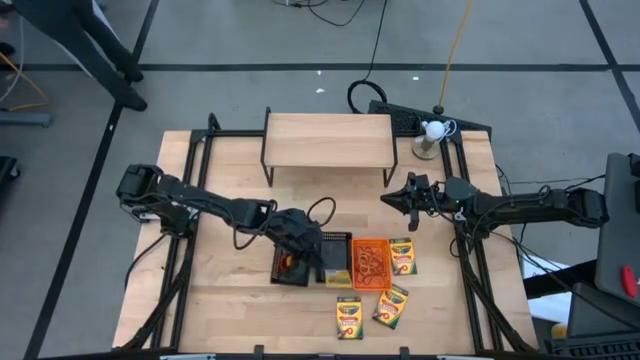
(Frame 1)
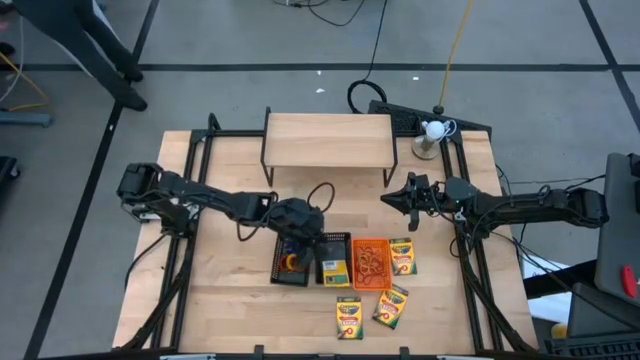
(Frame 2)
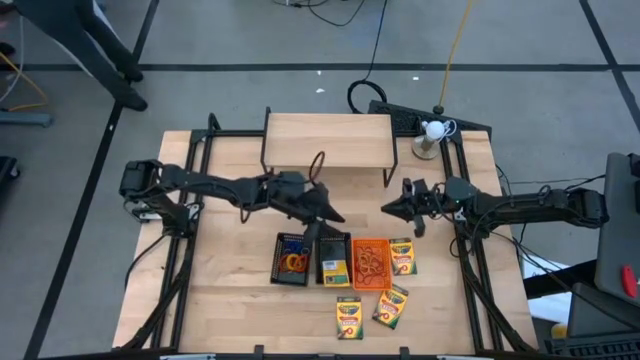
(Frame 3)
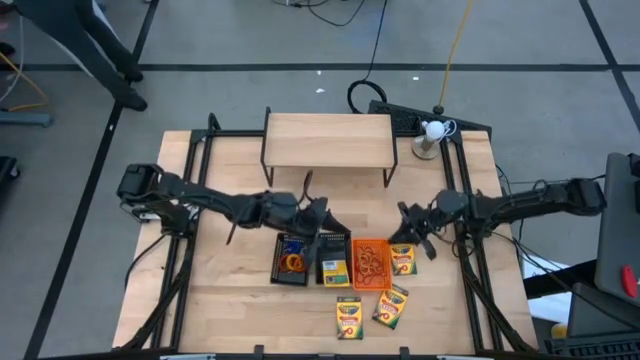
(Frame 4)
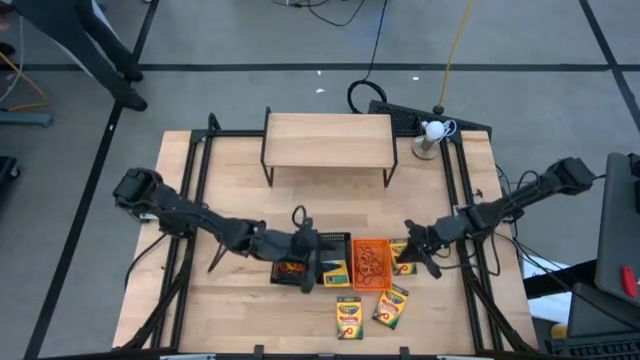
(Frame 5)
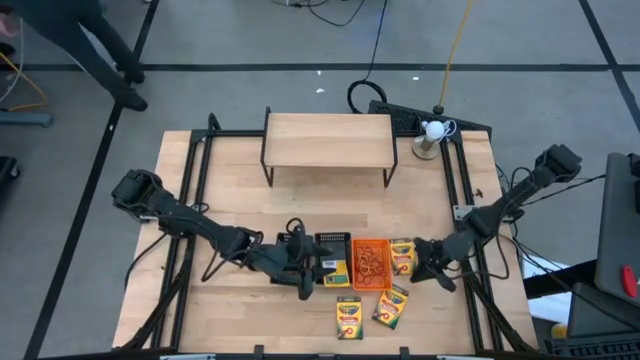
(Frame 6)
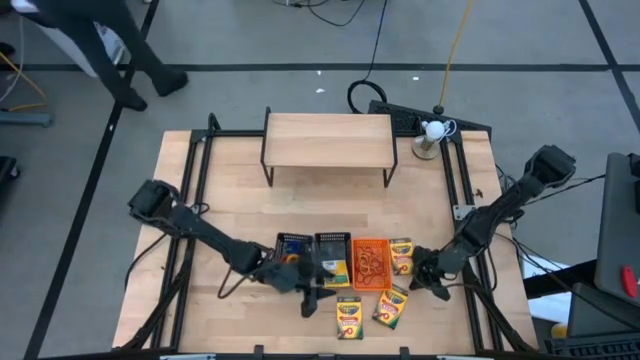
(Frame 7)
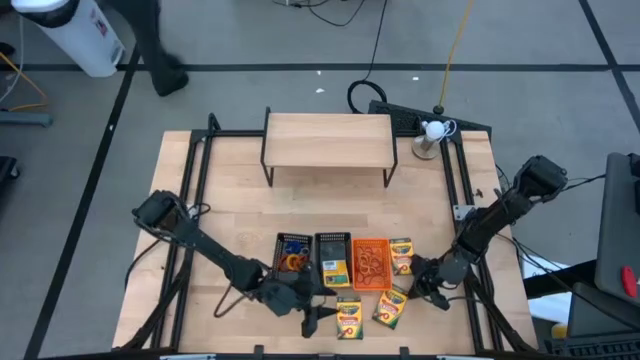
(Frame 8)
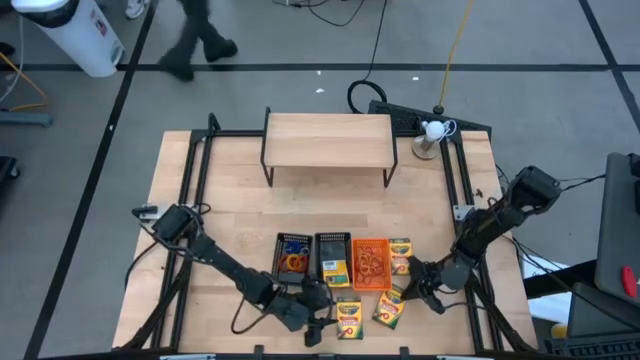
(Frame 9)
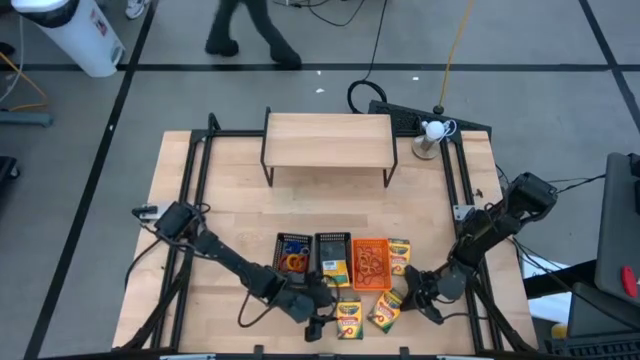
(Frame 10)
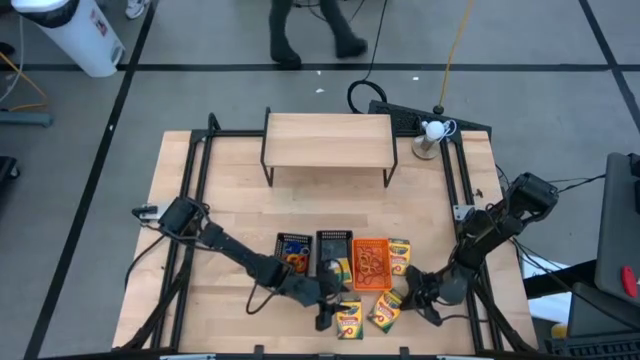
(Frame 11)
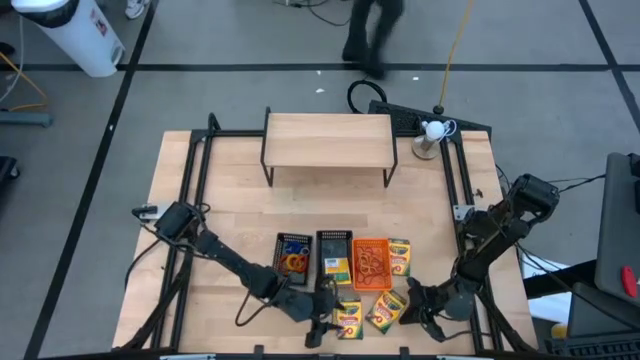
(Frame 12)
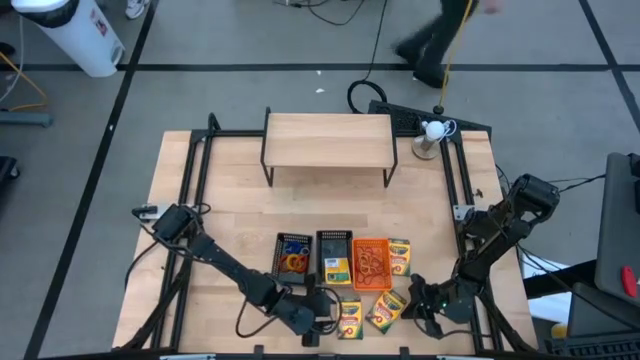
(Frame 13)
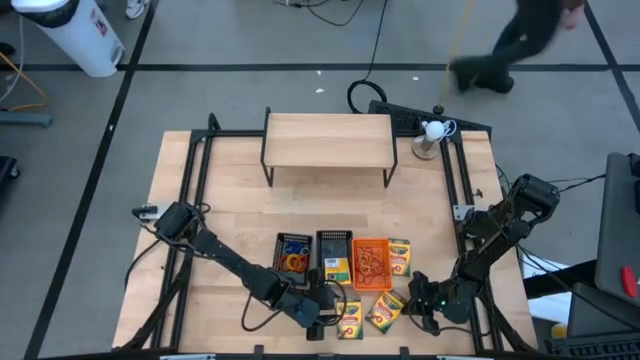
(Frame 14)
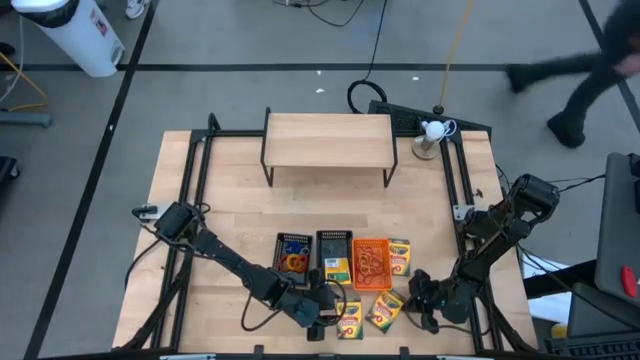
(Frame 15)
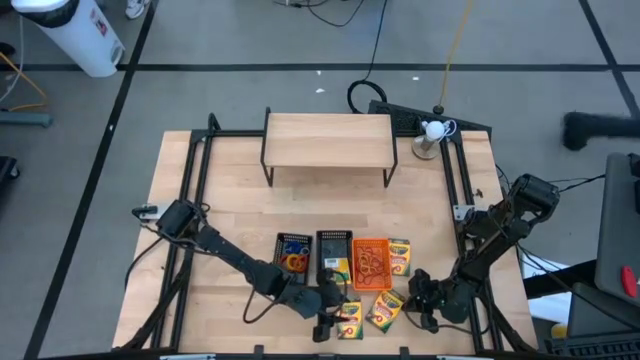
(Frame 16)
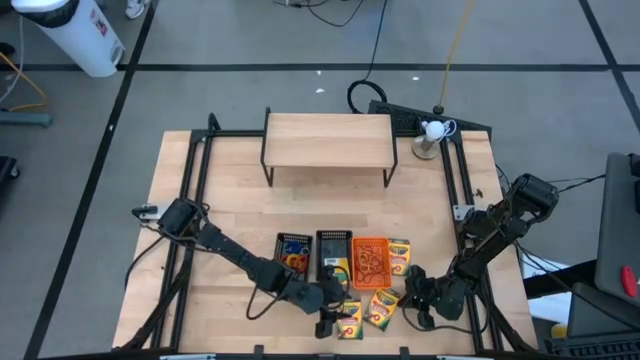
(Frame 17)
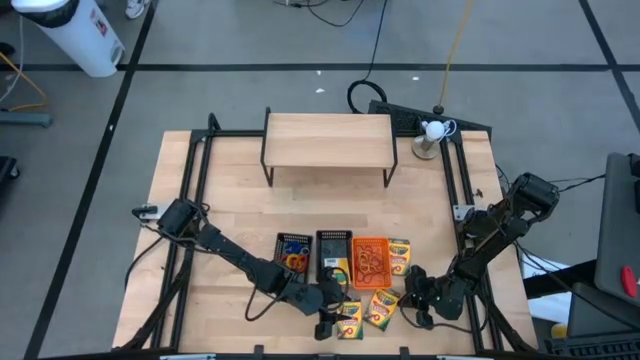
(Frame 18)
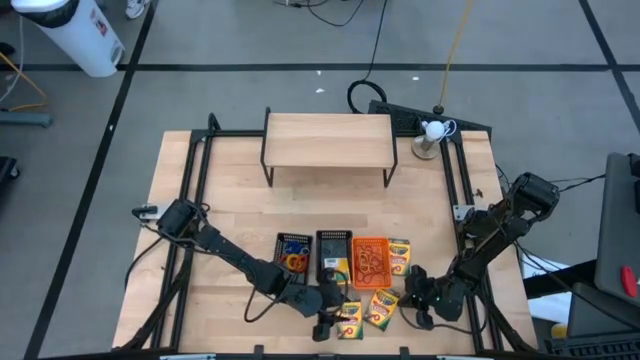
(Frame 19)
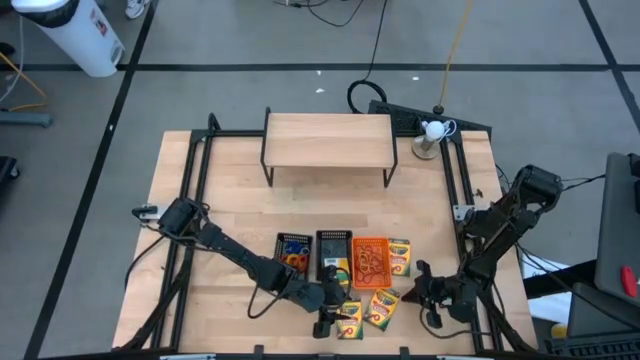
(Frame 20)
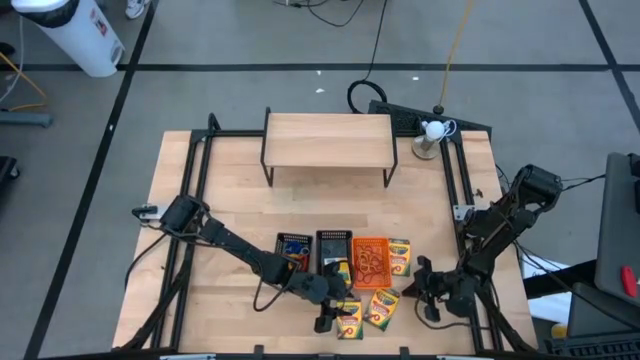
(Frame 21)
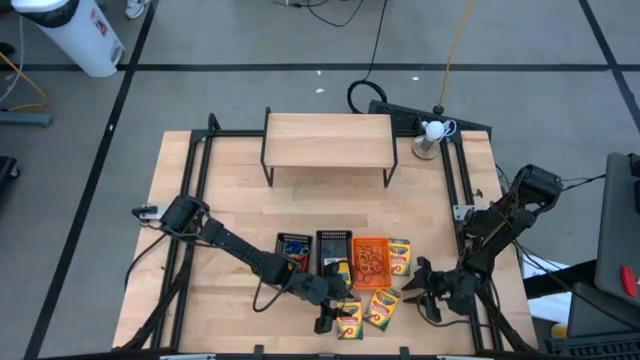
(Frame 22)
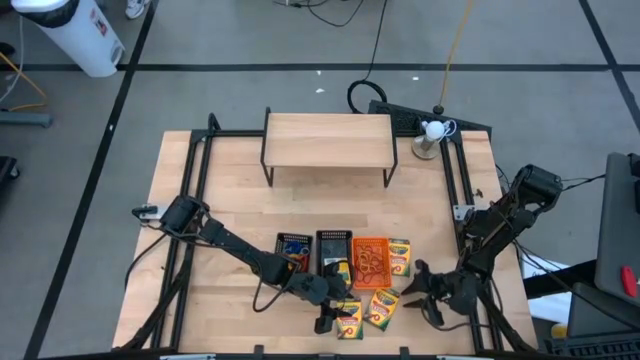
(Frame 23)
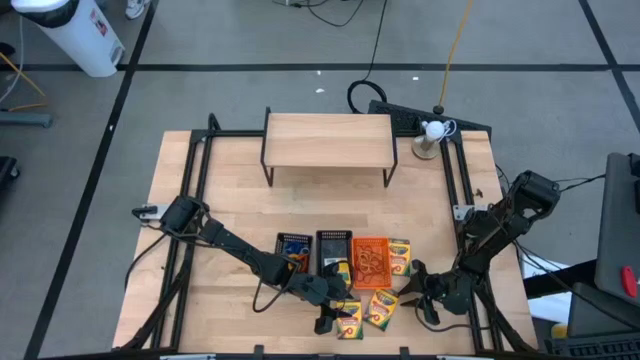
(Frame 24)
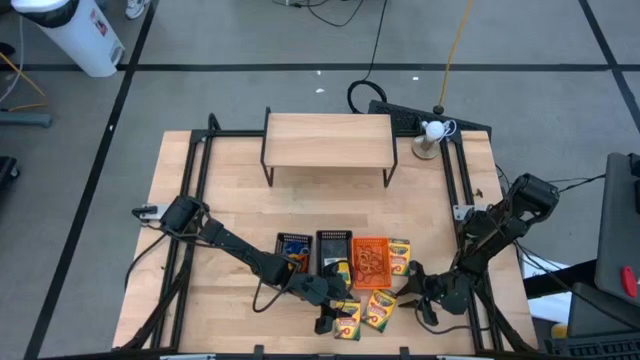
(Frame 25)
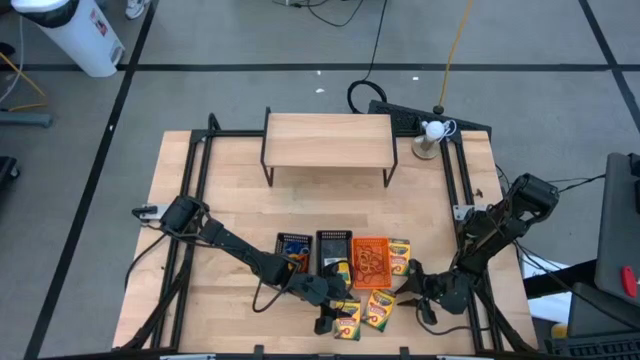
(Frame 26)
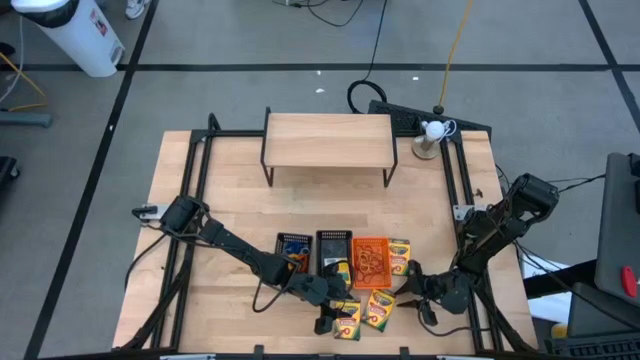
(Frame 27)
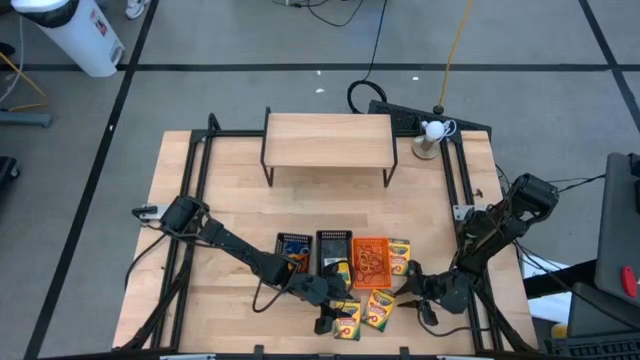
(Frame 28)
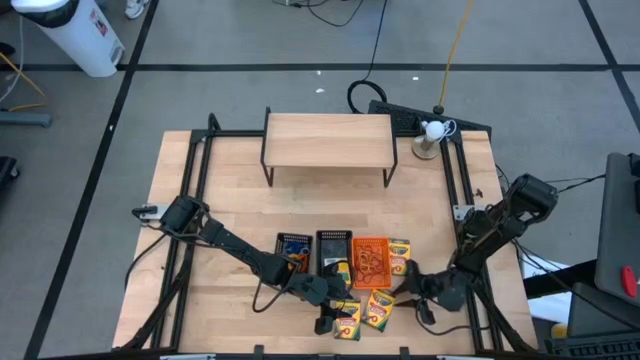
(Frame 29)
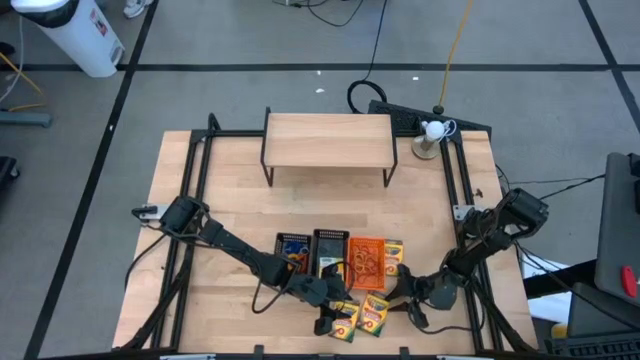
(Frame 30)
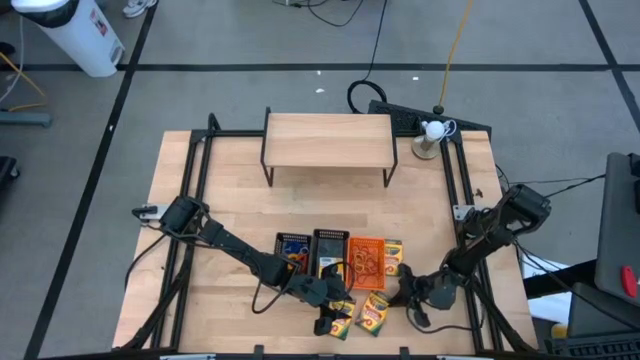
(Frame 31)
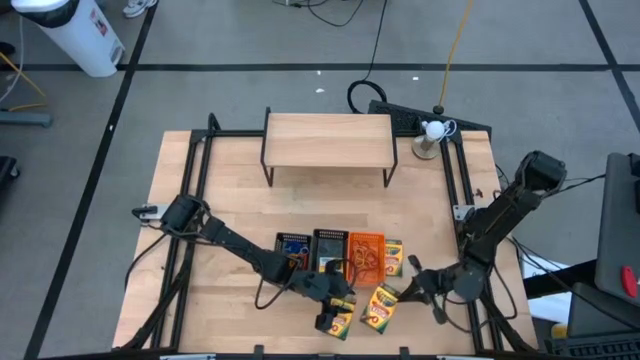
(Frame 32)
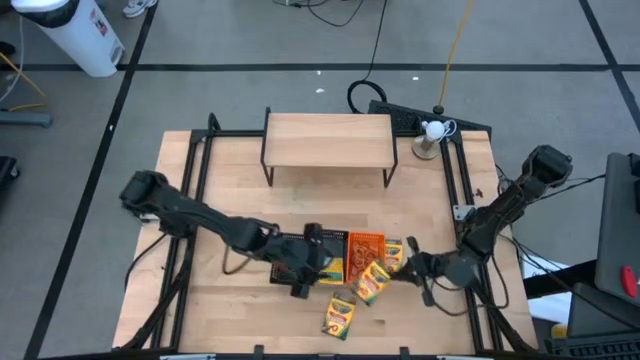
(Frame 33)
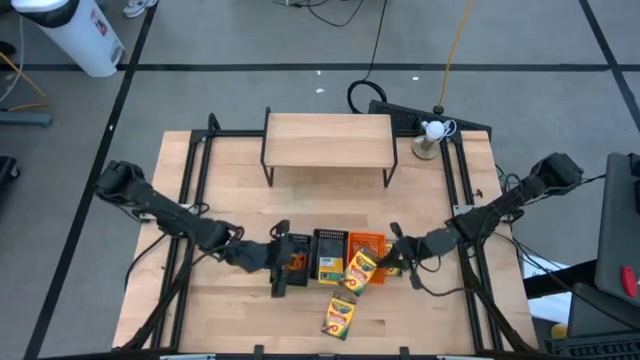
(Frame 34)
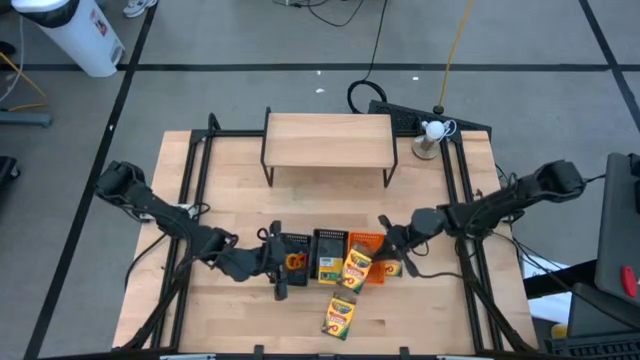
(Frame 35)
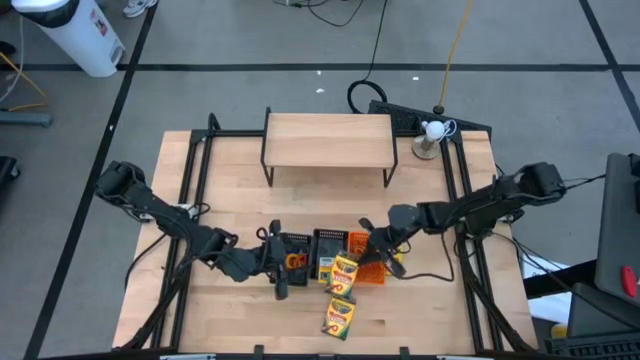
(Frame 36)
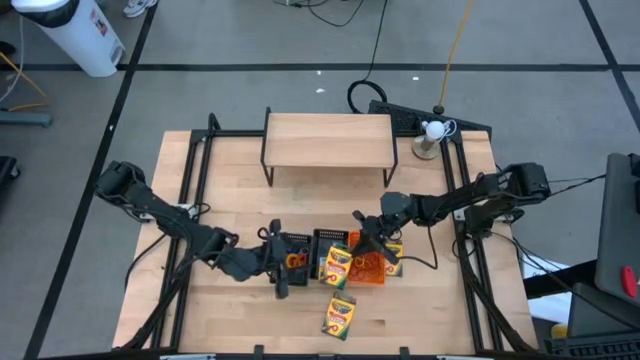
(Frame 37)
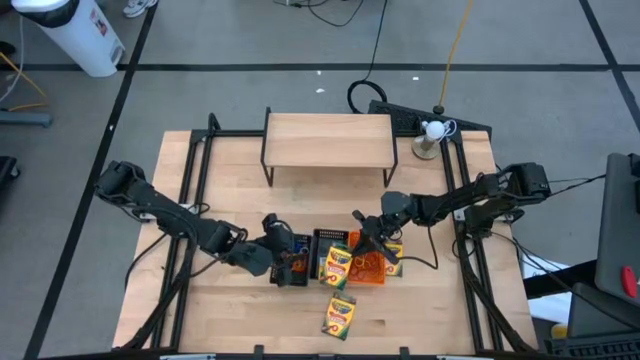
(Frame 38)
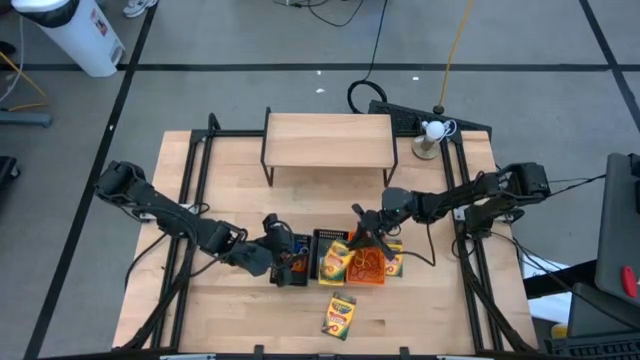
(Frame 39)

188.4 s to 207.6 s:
Task: Pick & Place Office Desk Supplies
Put the crayon box into the right black bin

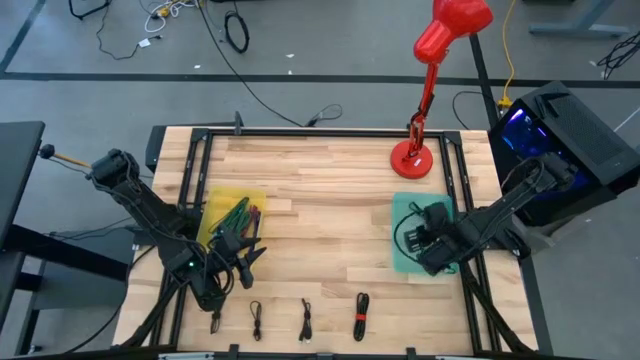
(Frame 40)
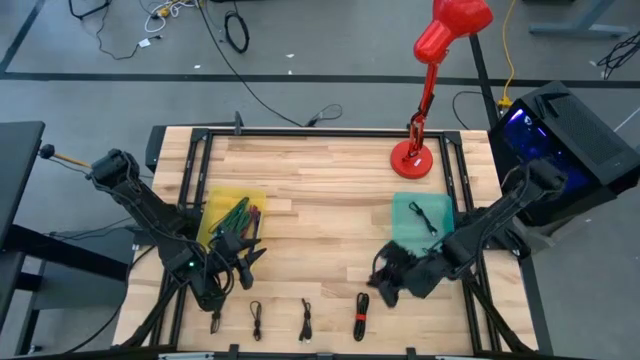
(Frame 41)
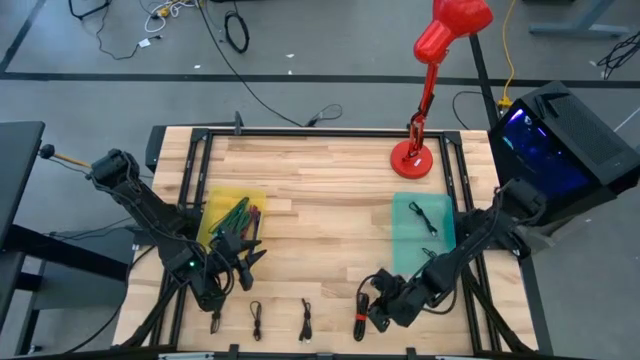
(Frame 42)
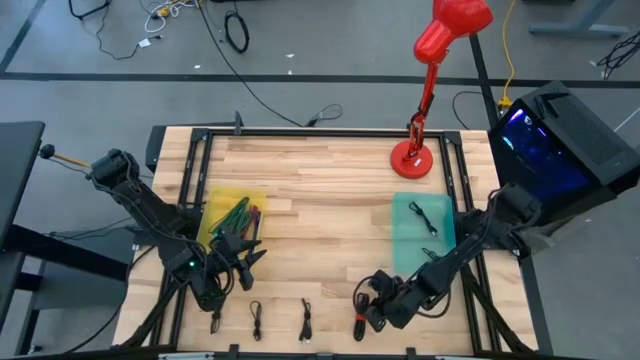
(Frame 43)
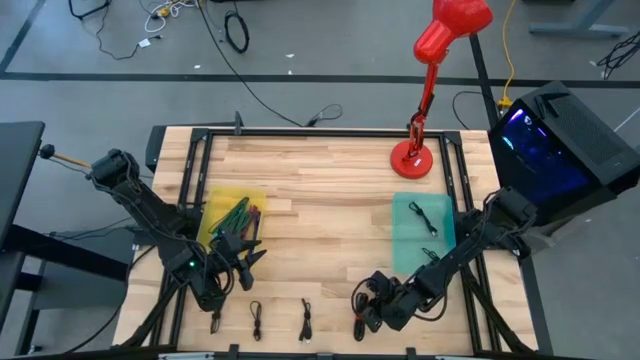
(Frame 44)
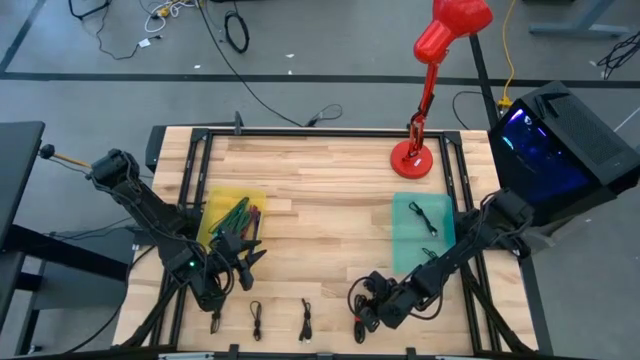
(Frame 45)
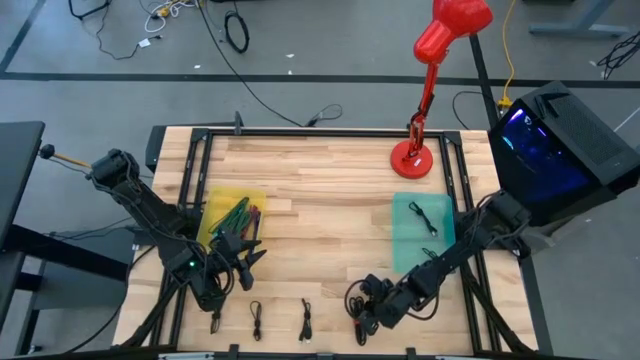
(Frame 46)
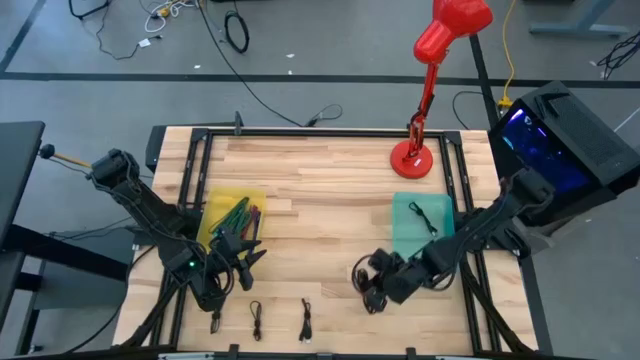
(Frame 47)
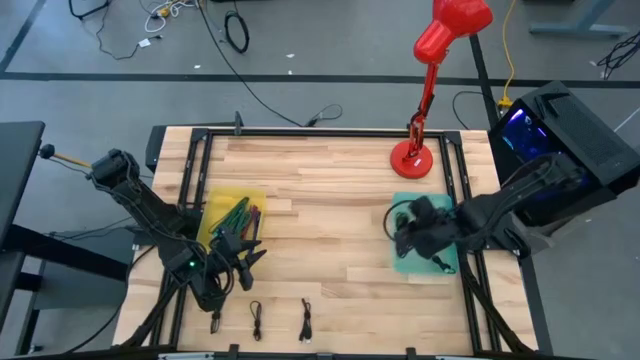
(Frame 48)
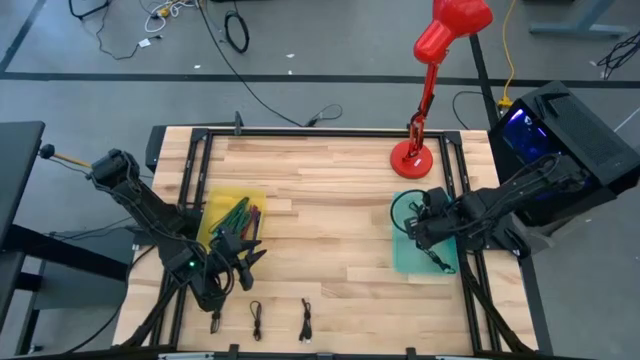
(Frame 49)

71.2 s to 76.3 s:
Task: Pick & Place USB Port
Put the black charger cable into the green bin
